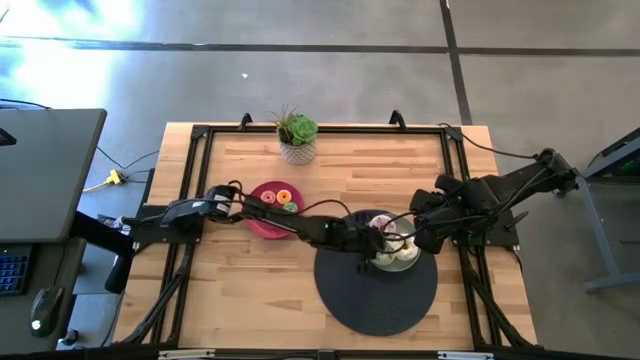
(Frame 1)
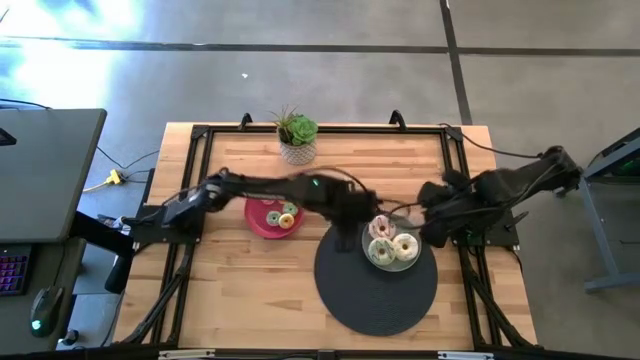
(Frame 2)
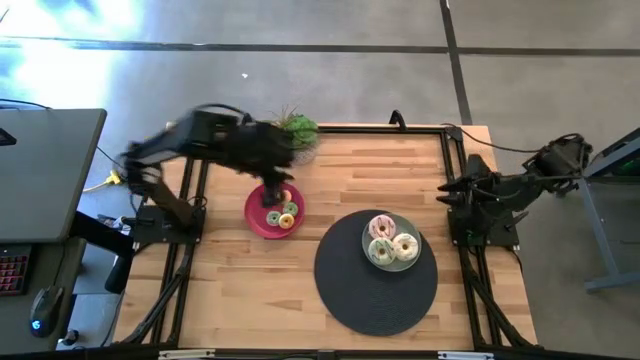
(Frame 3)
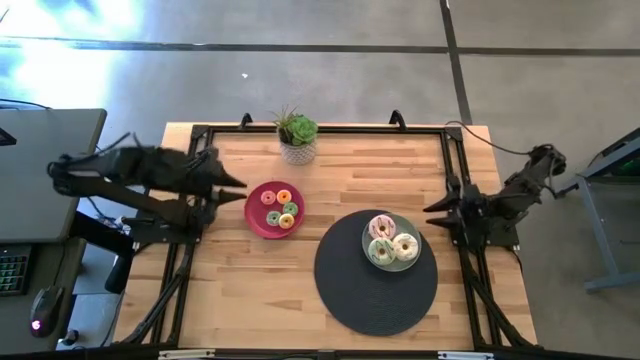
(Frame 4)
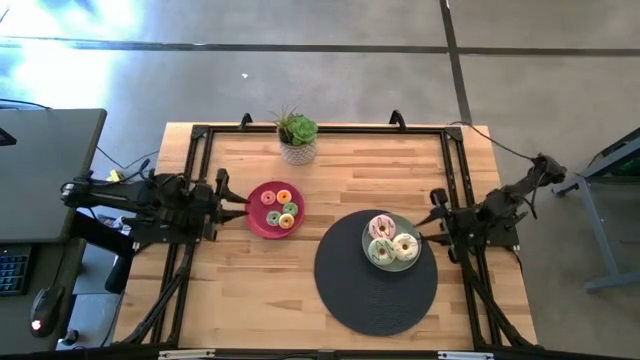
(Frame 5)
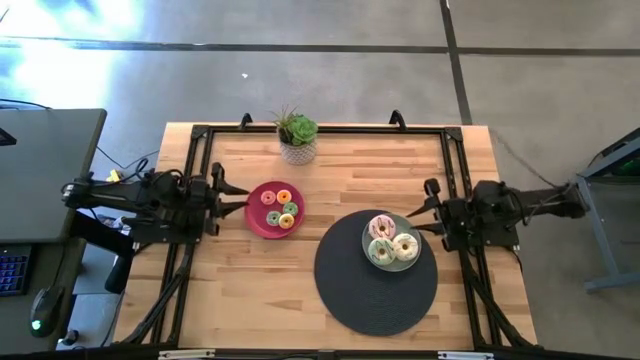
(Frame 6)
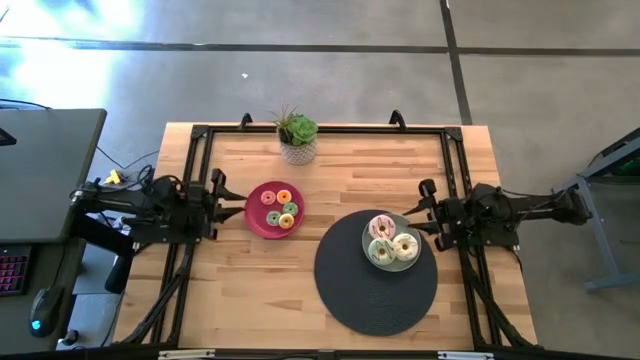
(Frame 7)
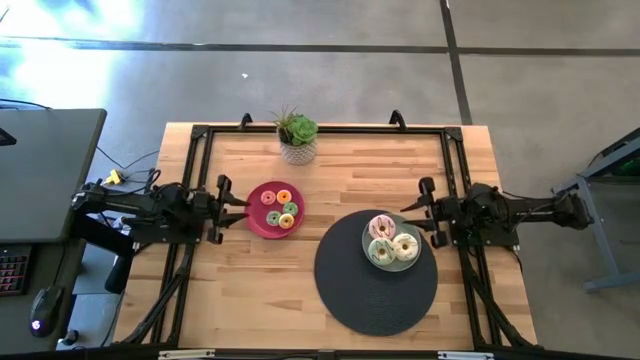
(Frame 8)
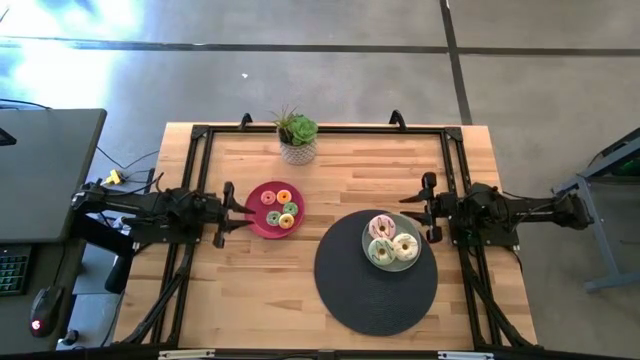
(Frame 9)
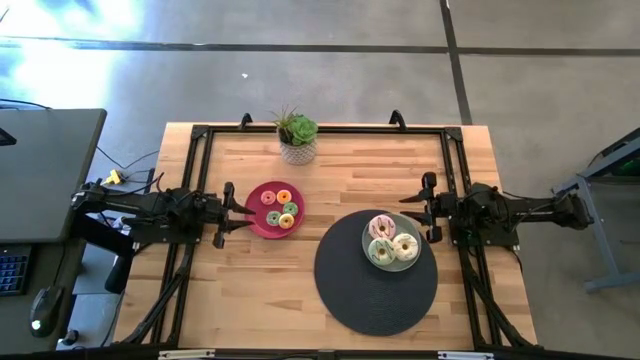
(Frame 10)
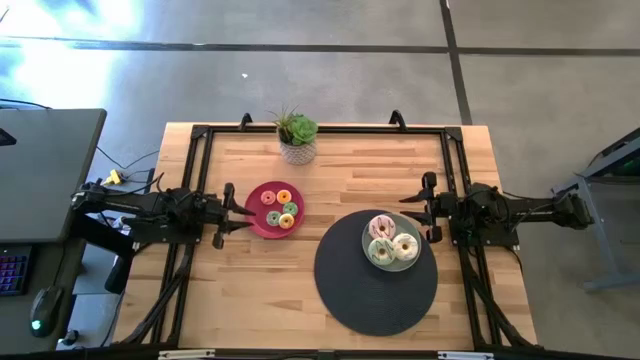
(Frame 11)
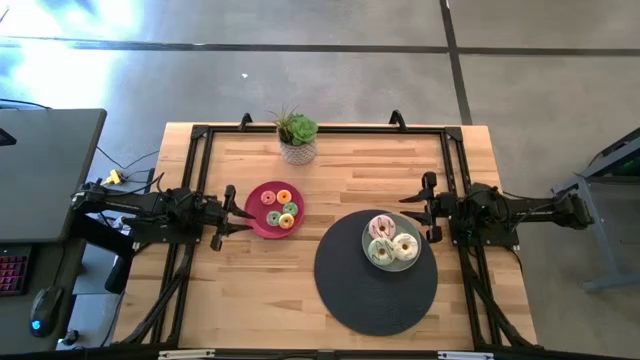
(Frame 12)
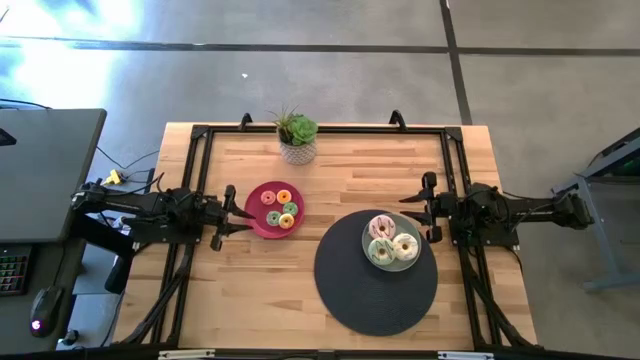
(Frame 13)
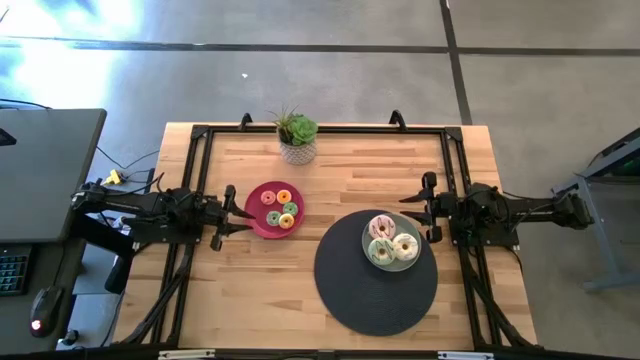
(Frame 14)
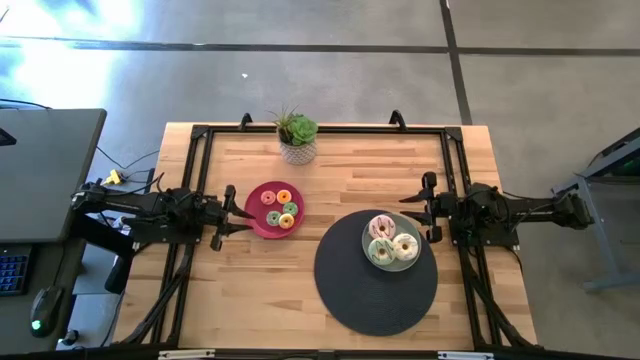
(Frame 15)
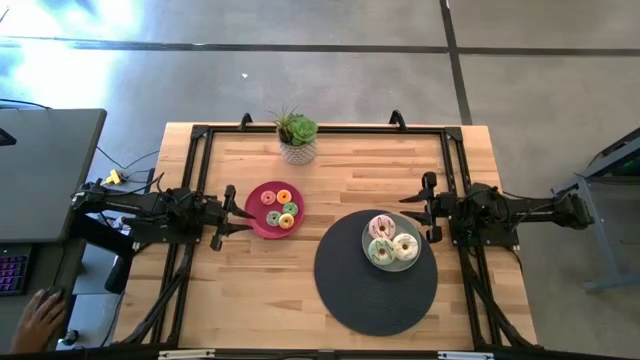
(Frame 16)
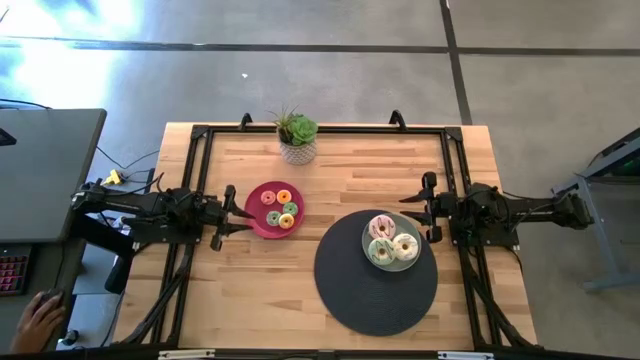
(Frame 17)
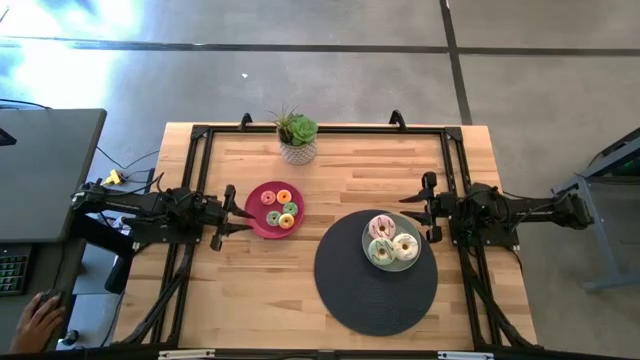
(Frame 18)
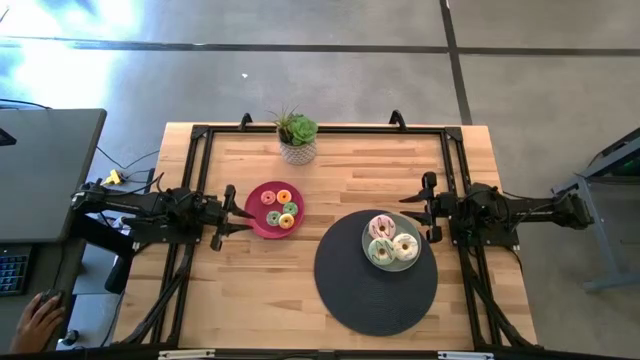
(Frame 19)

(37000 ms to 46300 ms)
Task: Pick & Place donuts
Return to Home Position

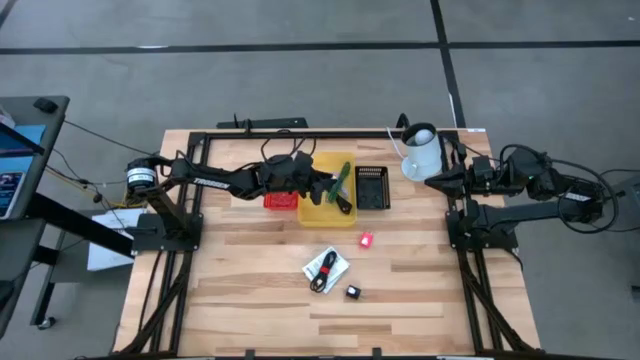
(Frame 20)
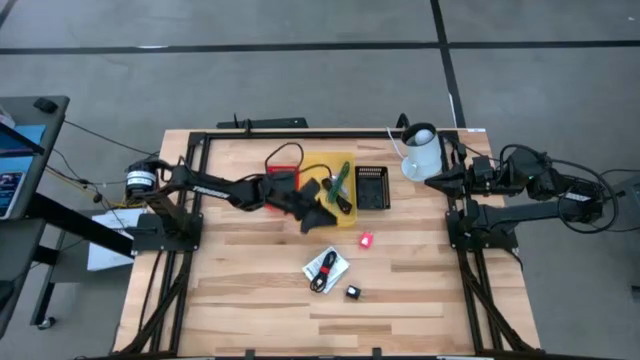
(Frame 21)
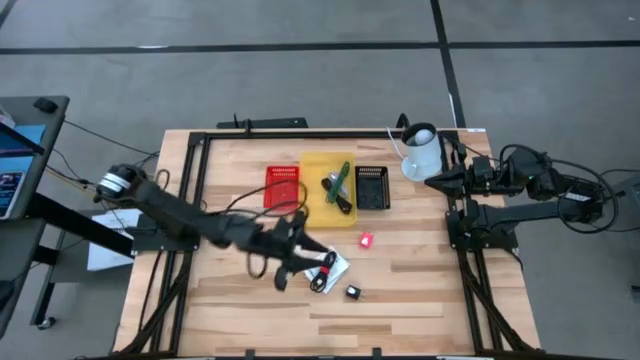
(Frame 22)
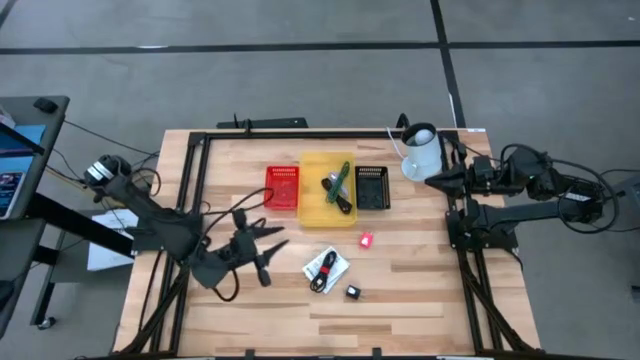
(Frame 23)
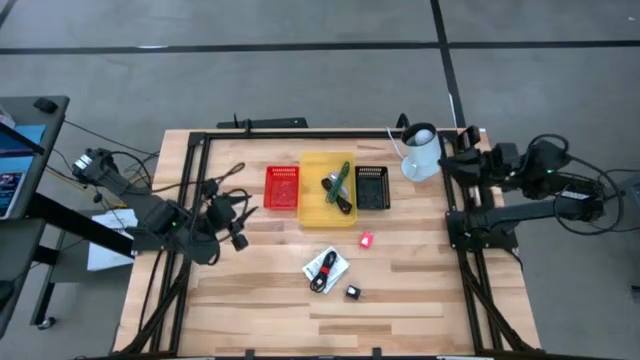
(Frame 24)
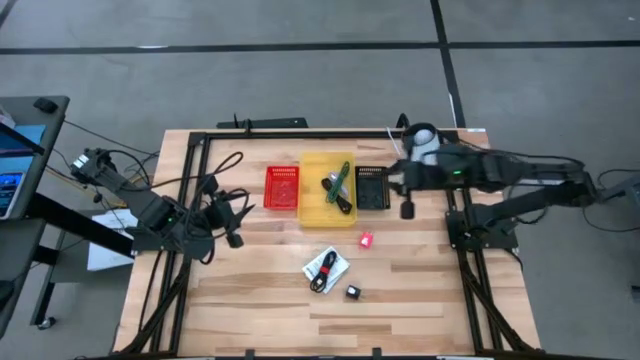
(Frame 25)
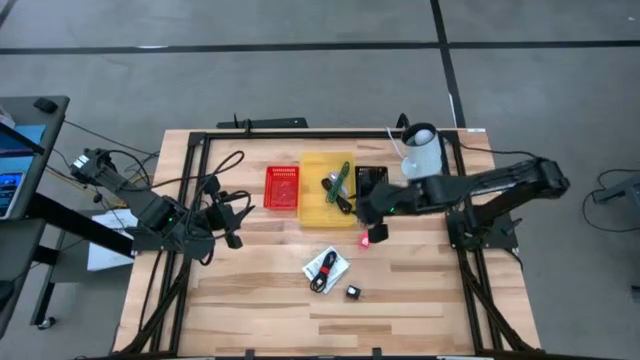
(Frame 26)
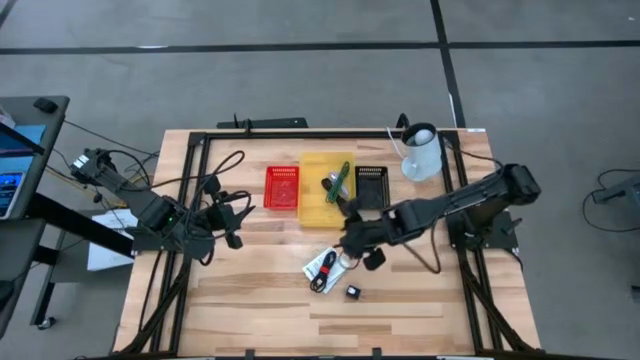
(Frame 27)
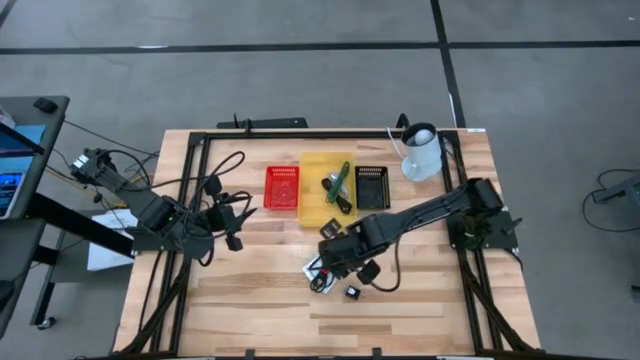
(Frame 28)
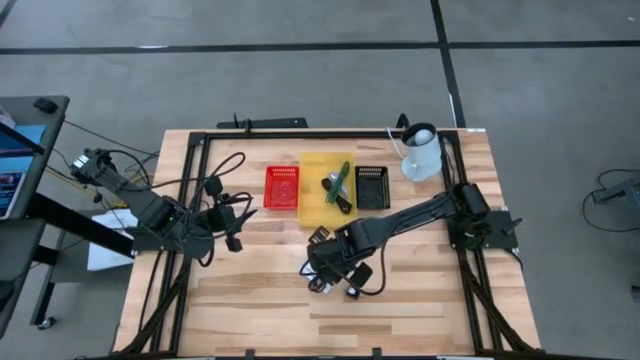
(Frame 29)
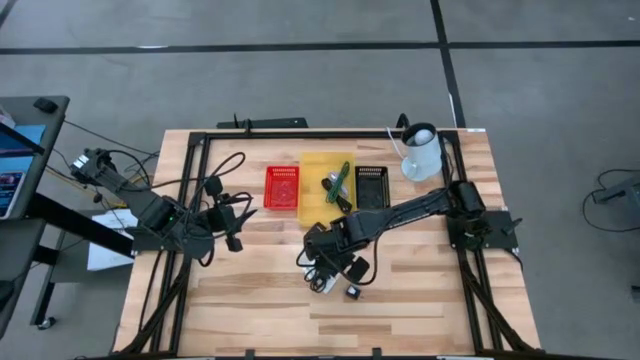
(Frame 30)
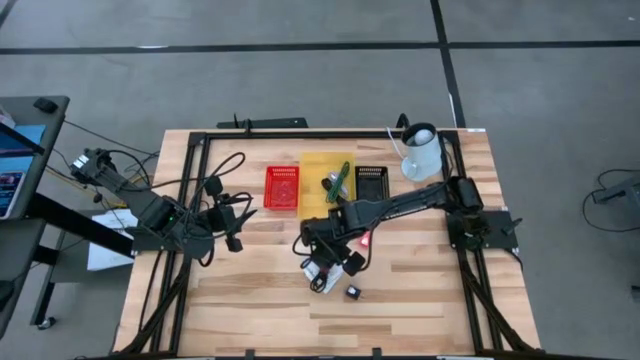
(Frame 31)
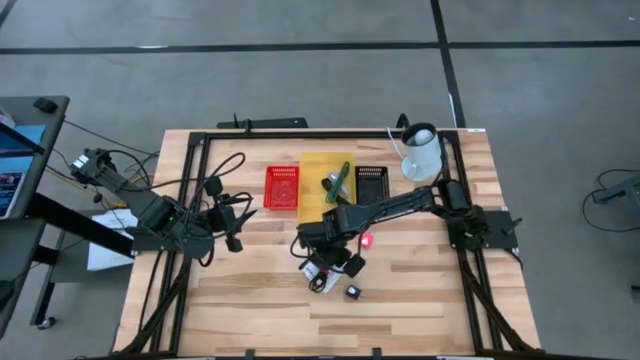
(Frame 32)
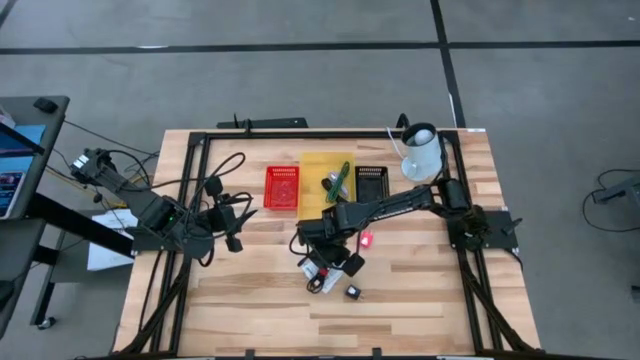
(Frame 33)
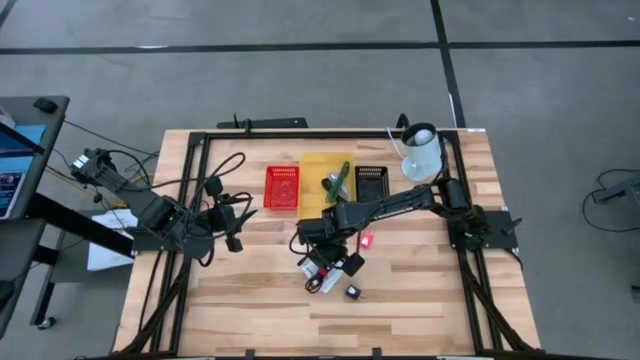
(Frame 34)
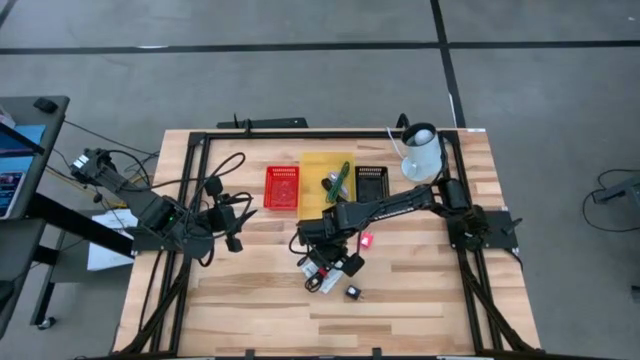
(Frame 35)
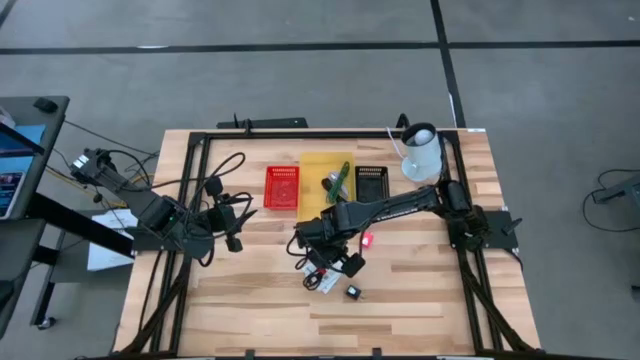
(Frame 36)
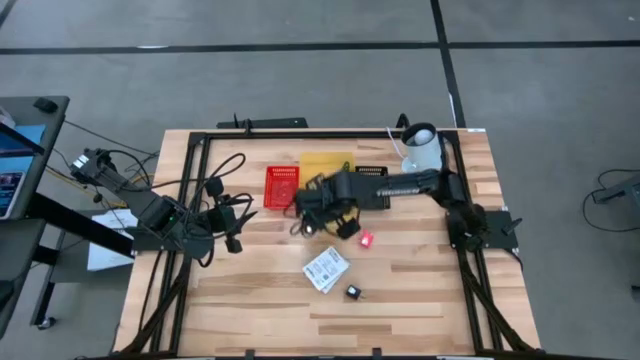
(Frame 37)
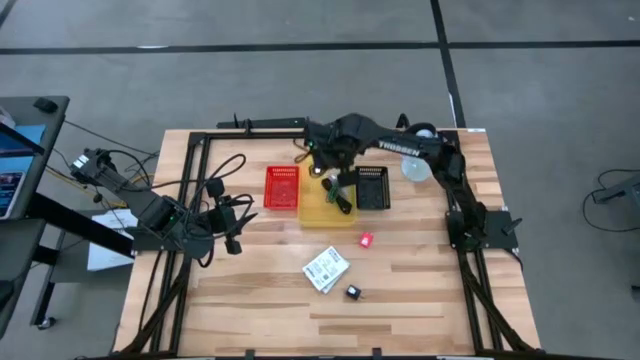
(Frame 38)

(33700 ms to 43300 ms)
Task: Pick and place items into bin
Put the black charger cable in the yellow bin

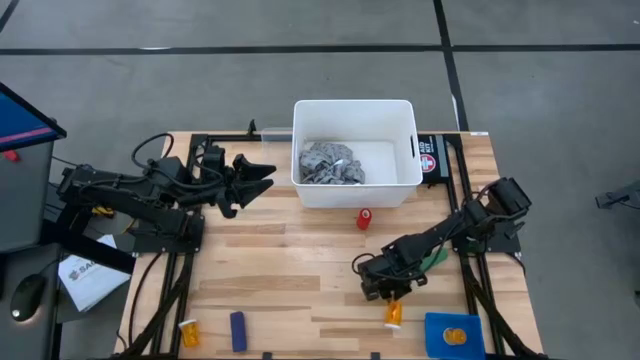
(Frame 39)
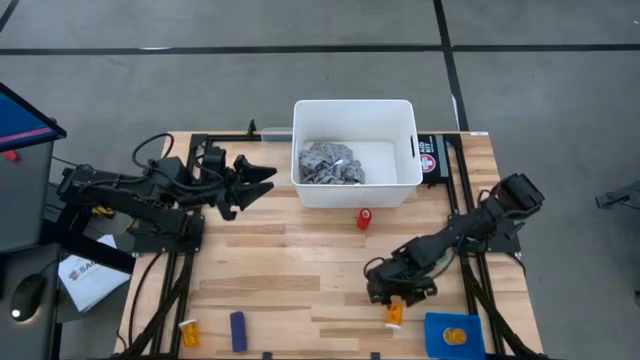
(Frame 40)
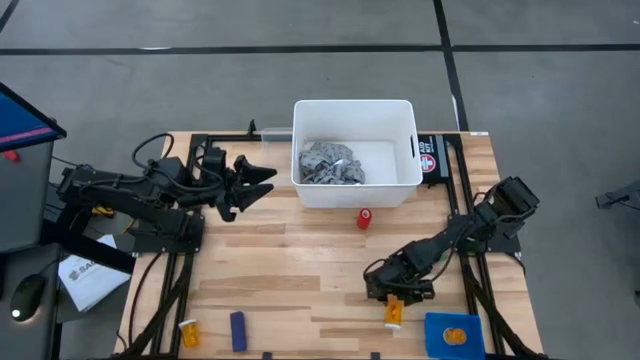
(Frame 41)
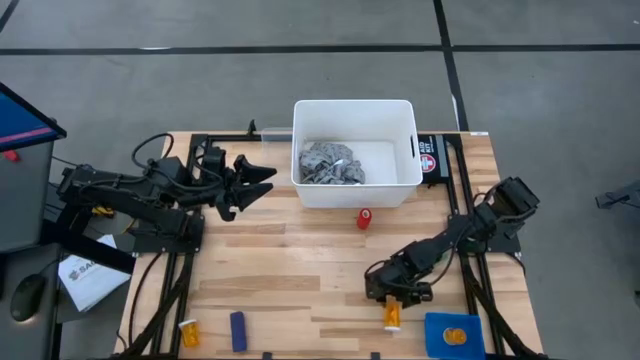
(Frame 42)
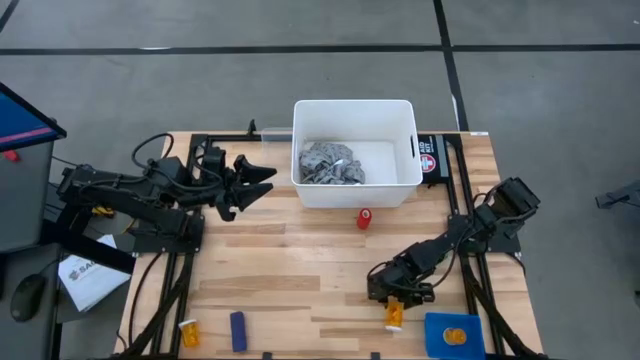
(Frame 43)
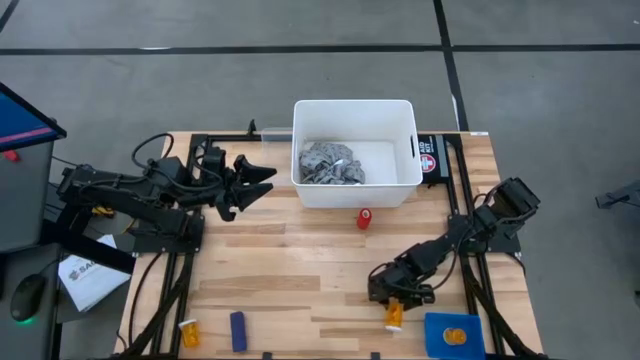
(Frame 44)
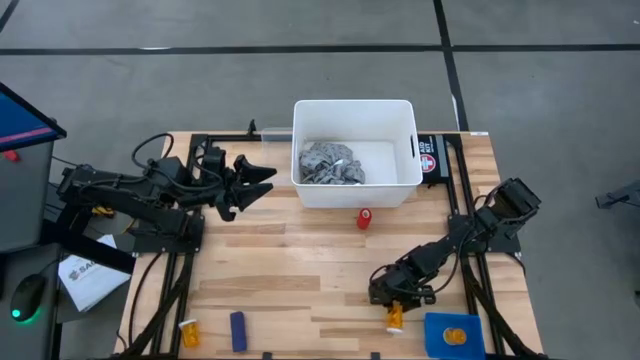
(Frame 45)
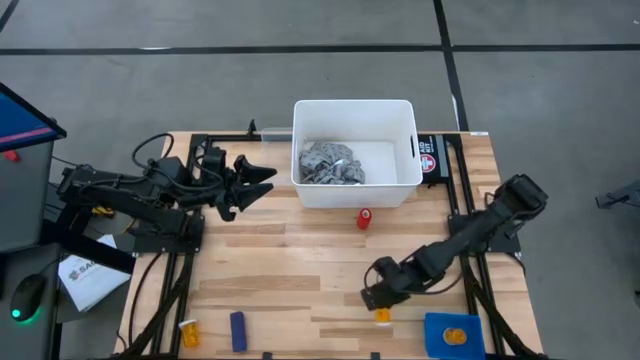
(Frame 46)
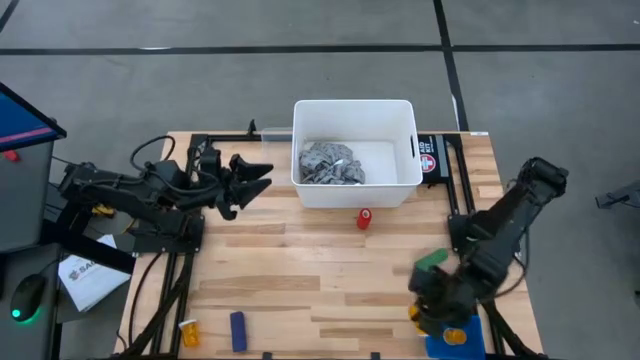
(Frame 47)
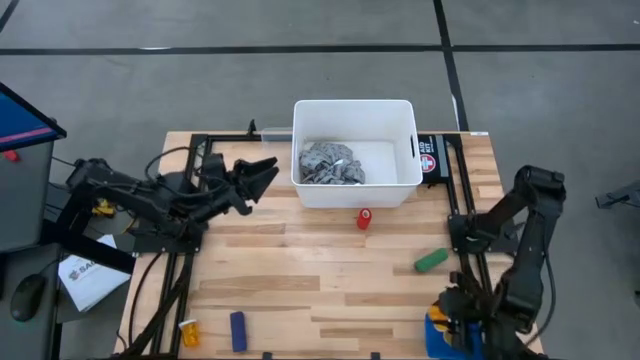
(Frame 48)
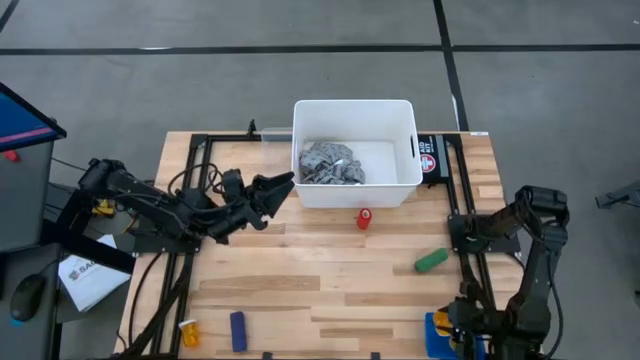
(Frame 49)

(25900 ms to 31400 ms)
Task: Pick & Place Medicine items
Put the right orange pill bottle into the blue bin
